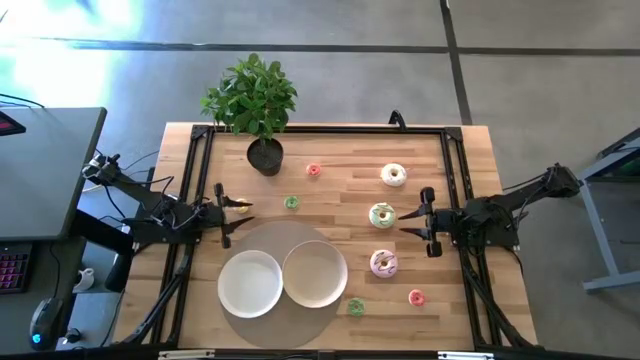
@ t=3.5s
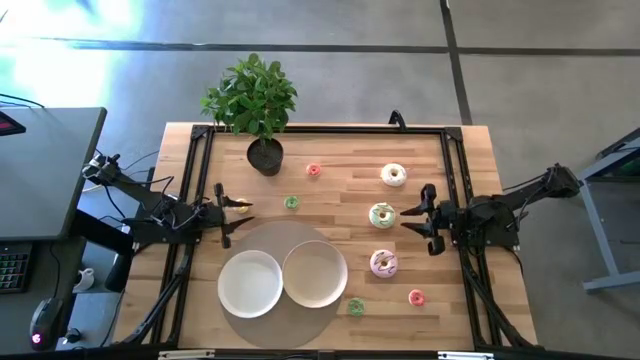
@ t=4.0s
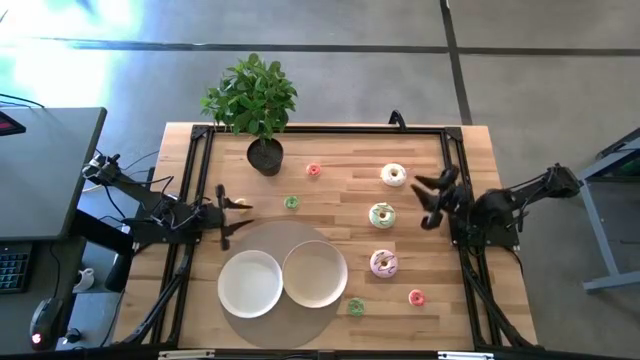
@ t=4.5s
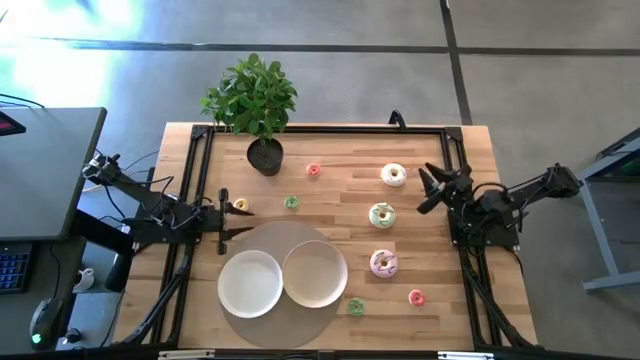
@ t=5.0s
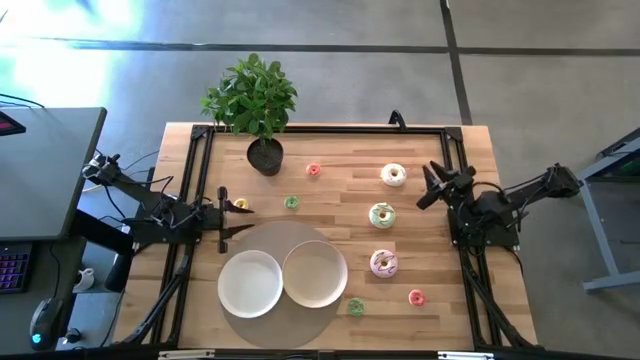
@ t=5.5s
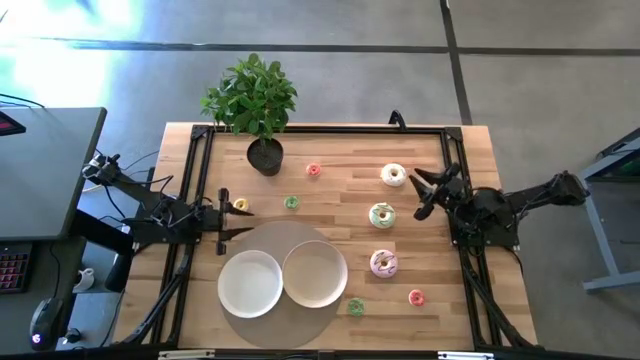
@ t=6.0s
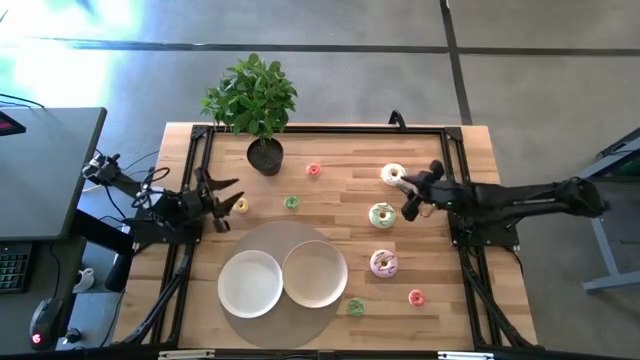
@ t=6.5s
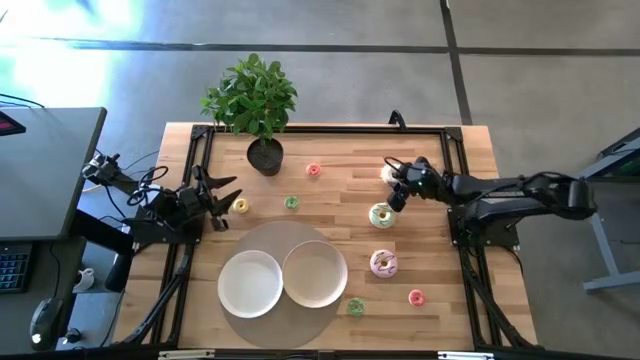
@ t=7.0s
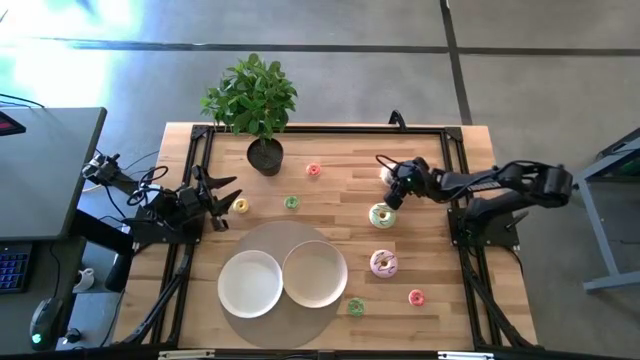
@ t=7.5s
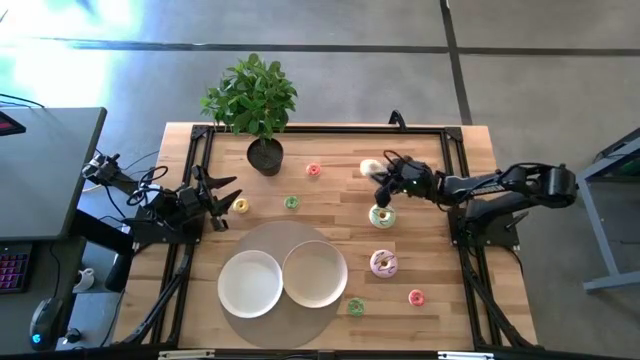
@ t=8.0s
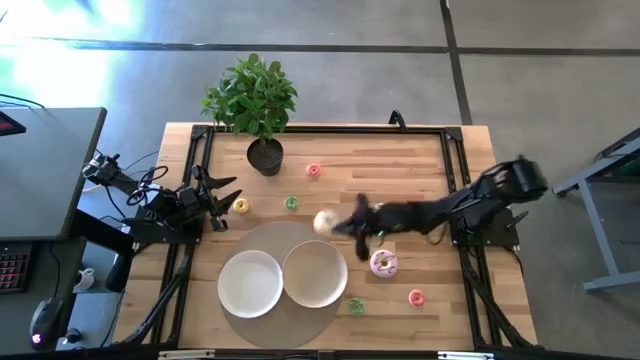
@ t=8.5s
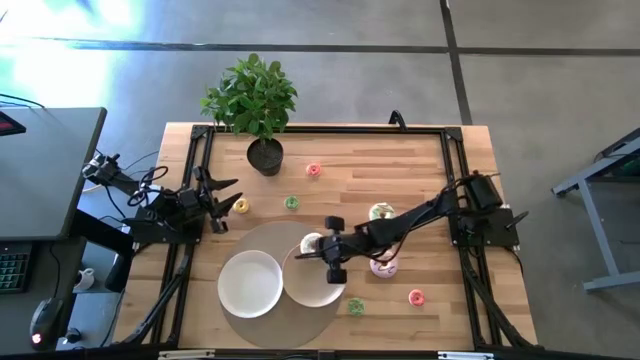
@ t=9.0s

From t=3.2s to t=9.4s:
Task: Pick & Place donuts
Put the large white donut on the light brown plate

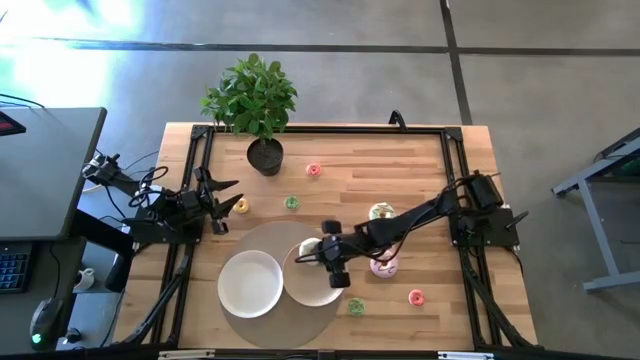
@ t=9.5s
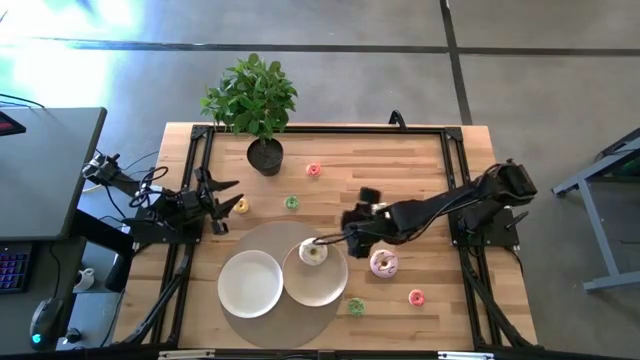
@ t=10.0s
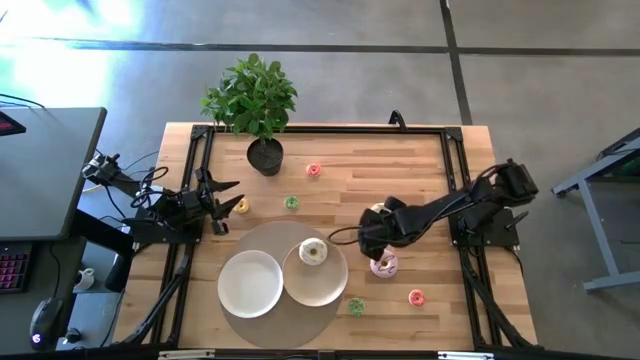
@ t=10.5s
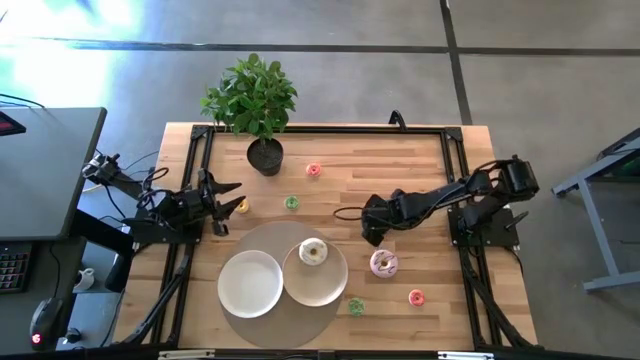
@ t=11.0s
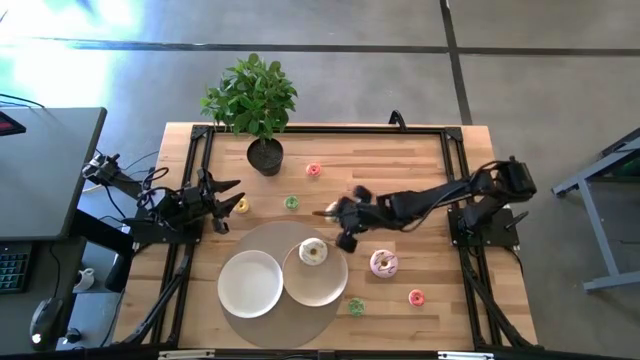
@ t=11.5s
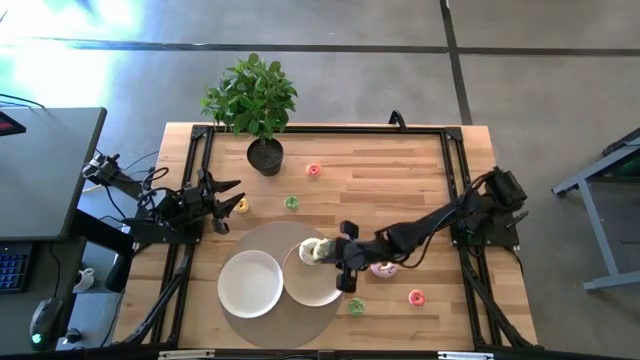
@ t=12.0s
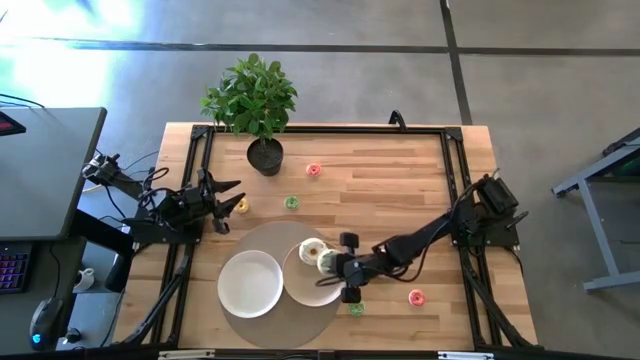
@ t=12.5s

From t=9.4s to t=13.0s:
Put the large blue donut on the light brown plate

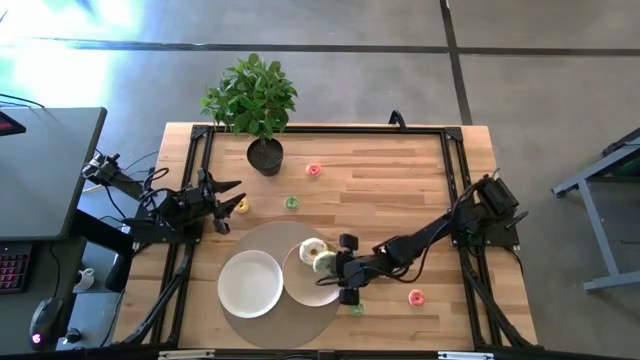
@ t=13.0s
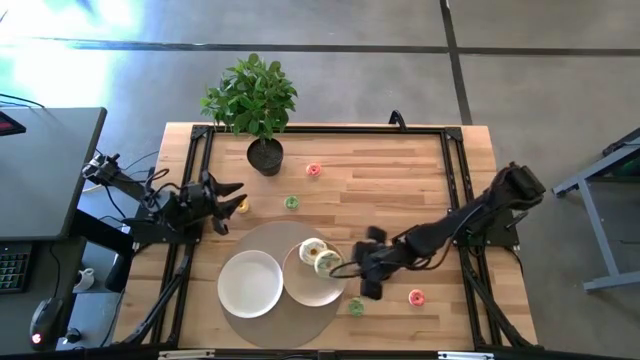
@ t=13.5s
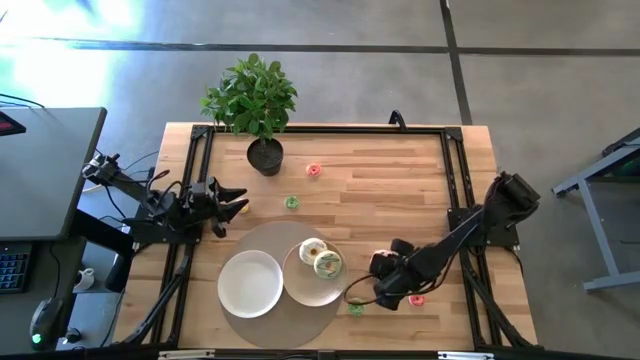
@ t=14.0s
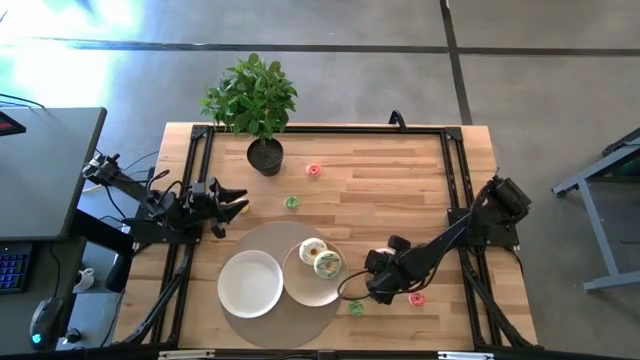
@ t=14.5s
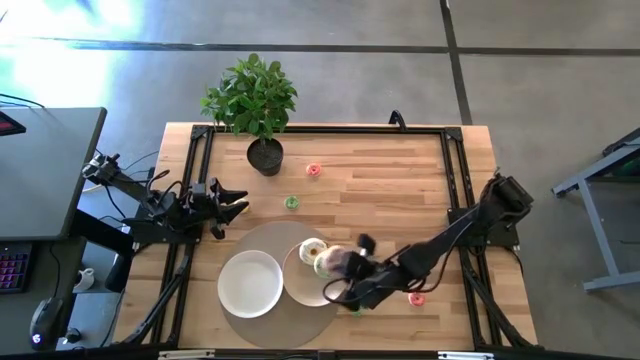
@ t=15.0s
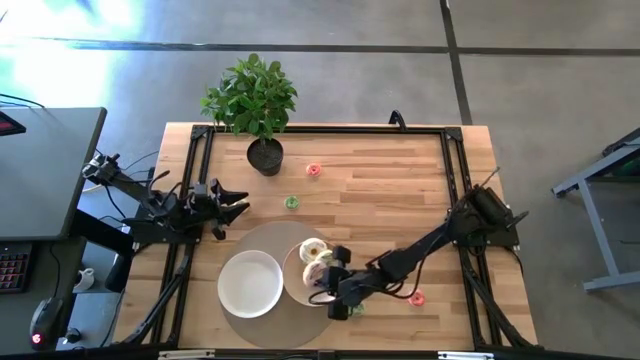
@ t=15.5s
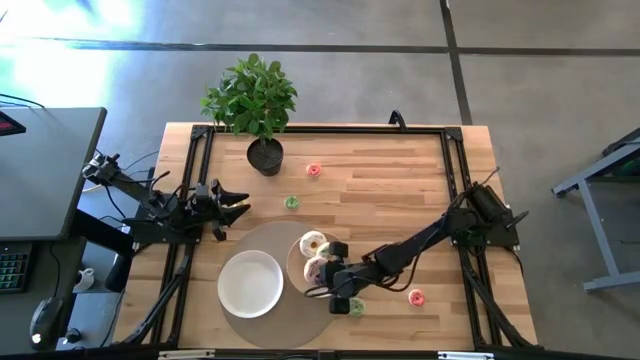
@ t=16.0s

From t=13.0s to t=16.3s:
Put the large purple donut on the light brown plate

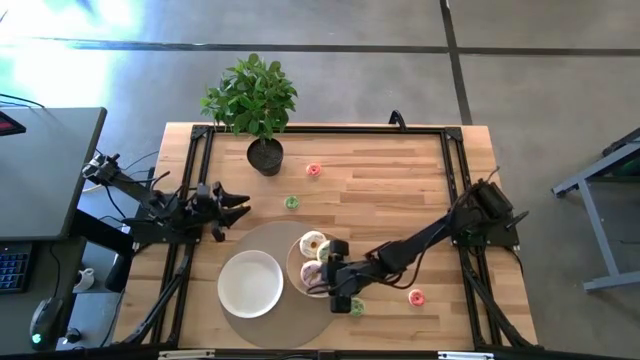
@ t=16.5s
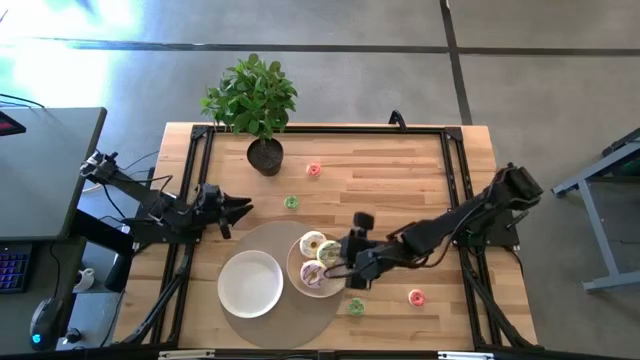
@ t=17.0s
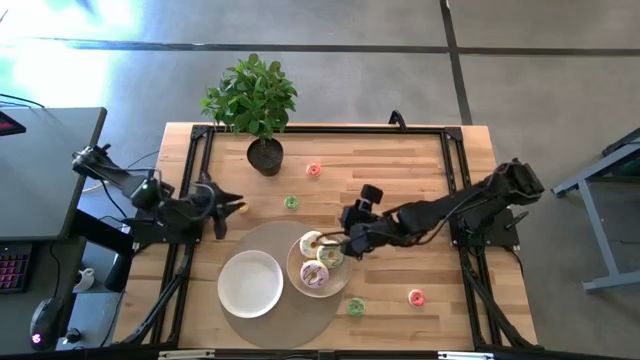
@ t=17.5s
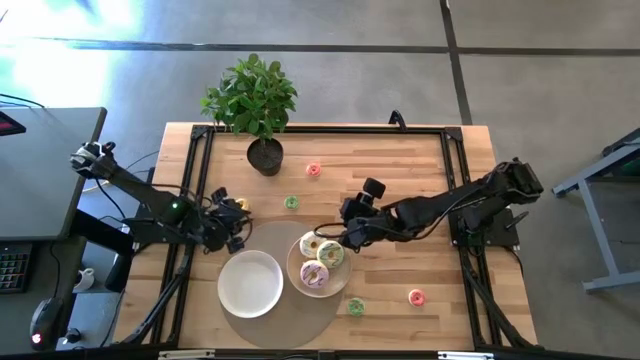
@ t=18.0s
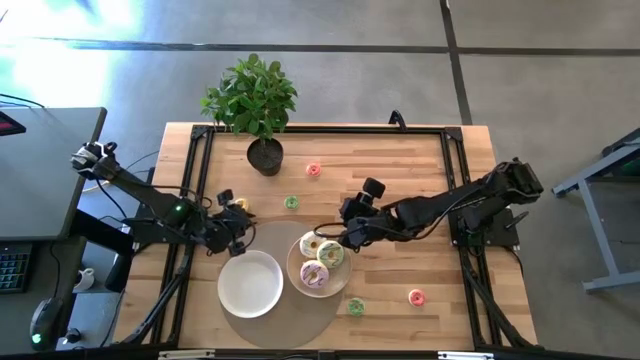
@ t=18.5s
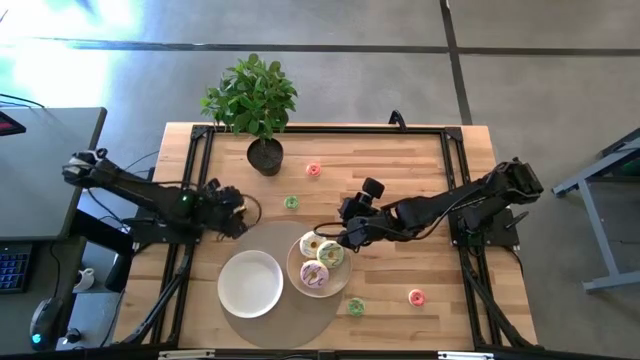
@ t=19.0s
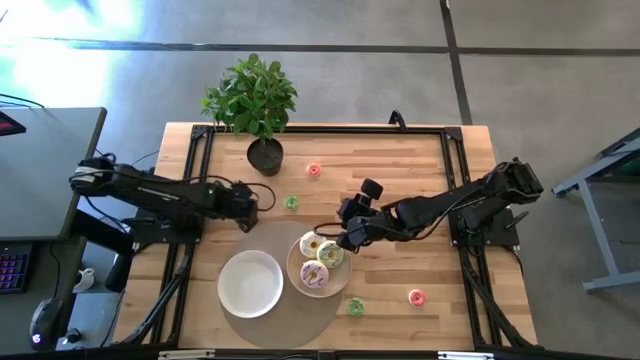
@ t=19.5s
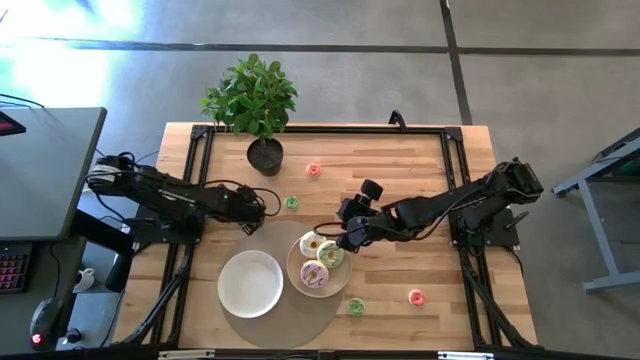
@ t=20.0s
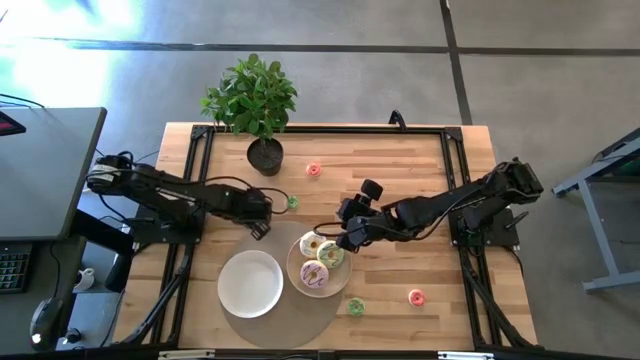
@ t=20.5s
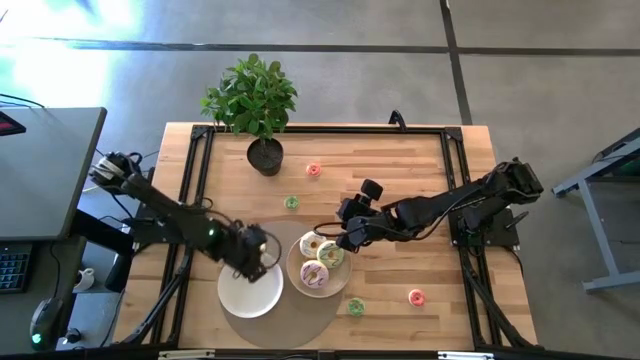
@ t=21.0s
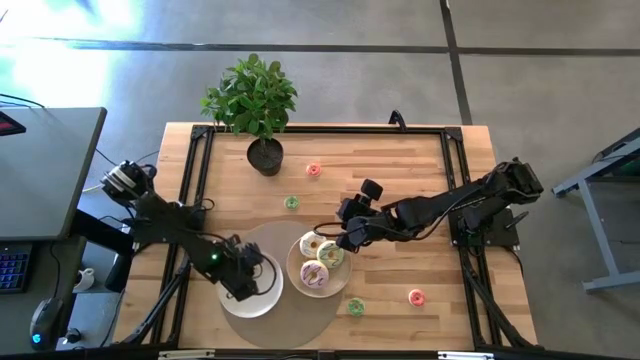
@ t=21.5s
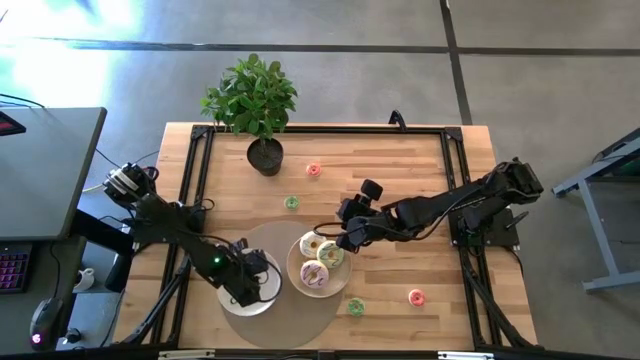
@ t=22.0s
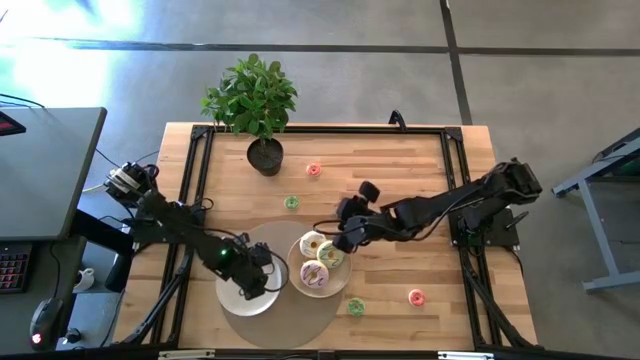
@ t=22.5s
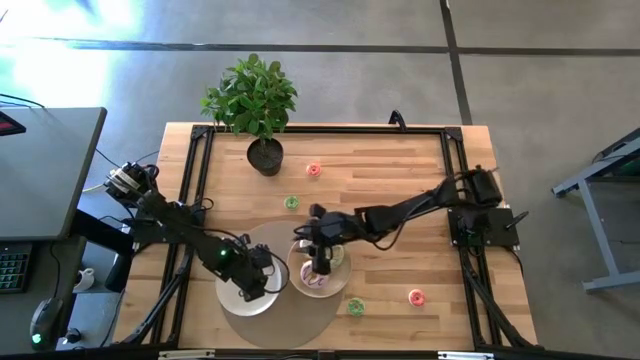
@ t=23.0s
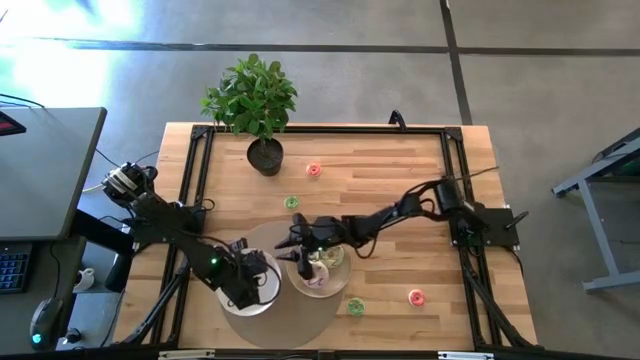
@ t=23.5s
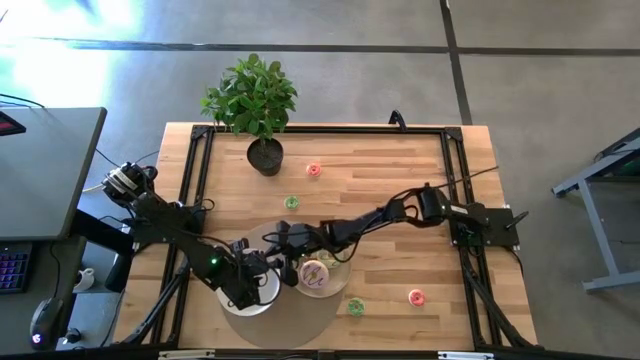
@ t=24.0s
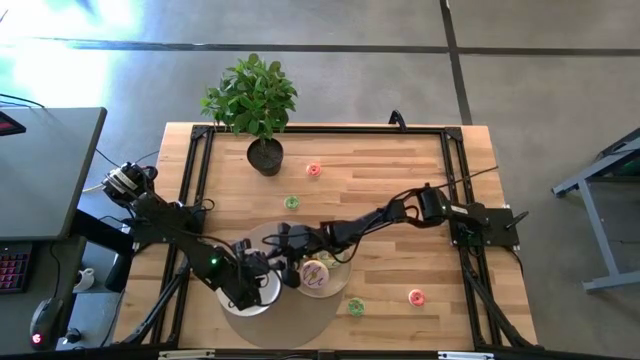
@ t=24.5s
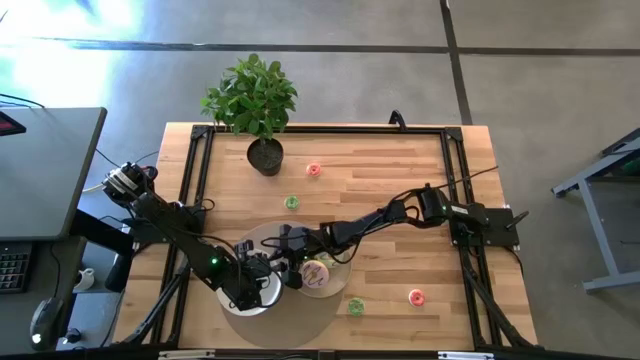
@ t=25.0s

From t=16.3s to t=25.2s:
Put the small yellow donut on the white plate
